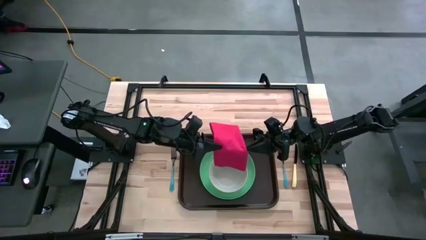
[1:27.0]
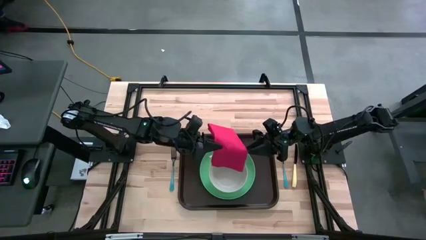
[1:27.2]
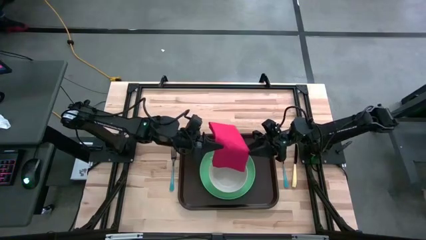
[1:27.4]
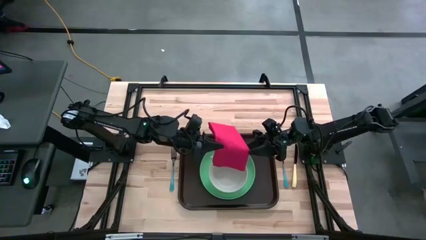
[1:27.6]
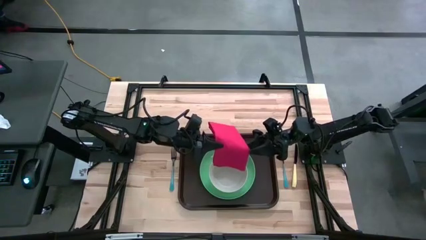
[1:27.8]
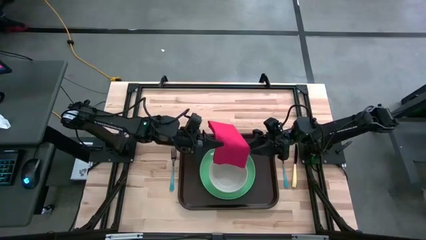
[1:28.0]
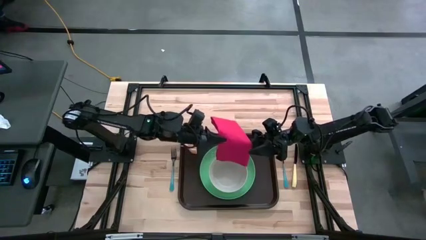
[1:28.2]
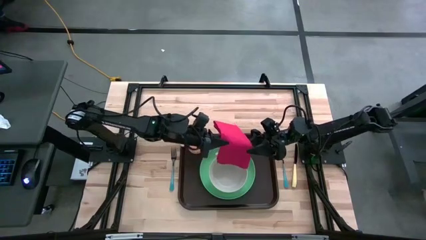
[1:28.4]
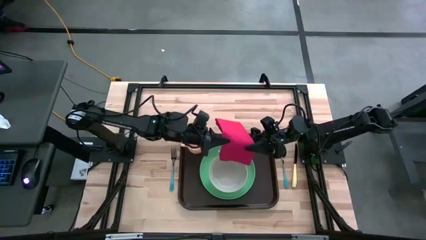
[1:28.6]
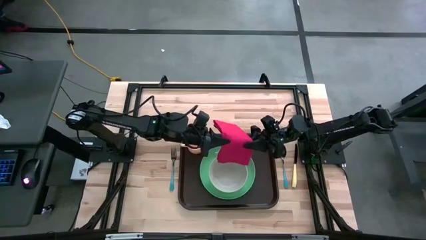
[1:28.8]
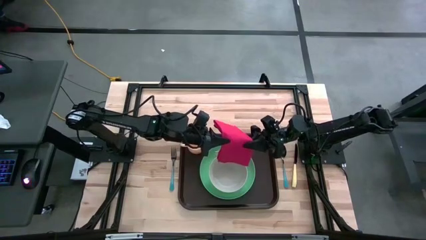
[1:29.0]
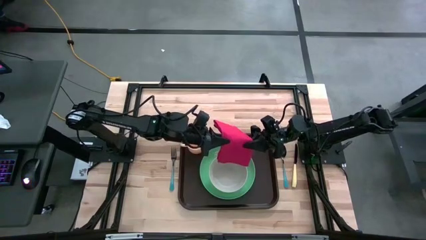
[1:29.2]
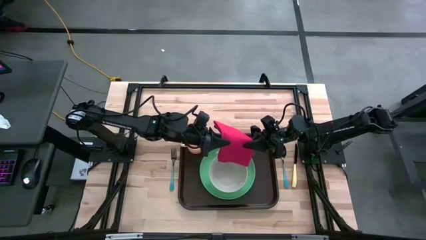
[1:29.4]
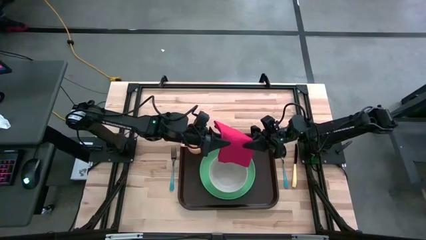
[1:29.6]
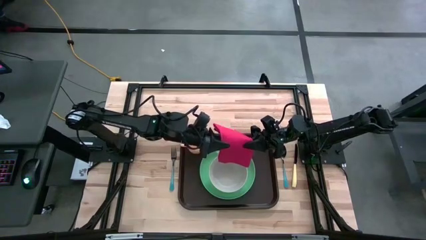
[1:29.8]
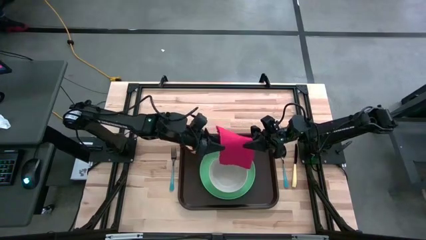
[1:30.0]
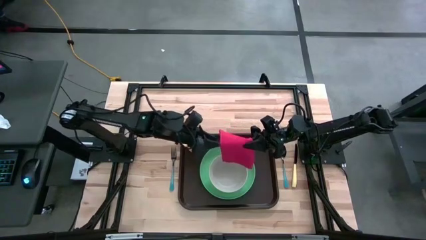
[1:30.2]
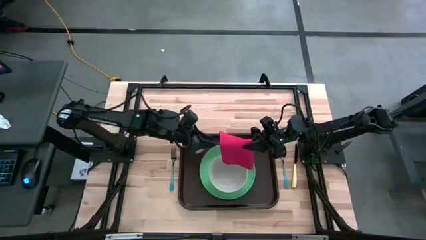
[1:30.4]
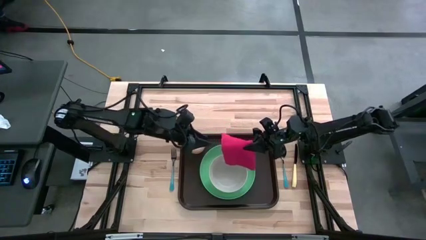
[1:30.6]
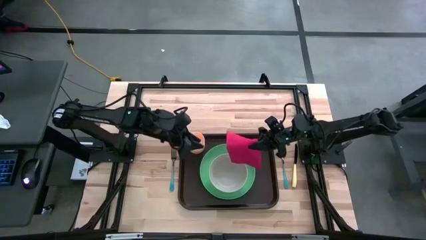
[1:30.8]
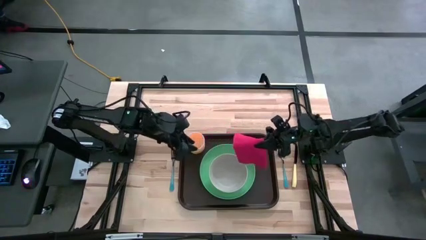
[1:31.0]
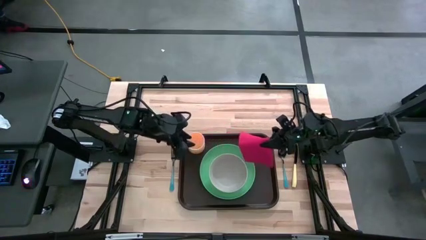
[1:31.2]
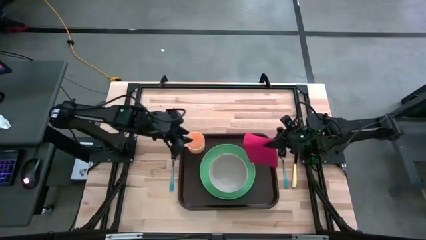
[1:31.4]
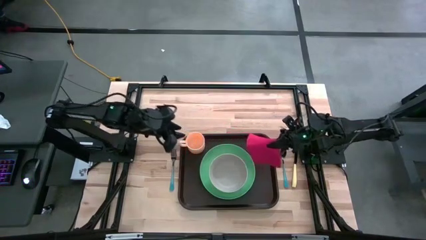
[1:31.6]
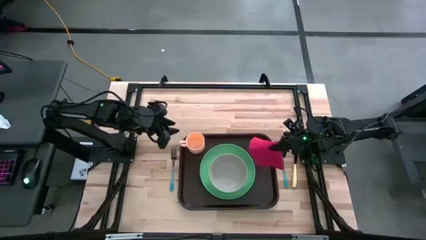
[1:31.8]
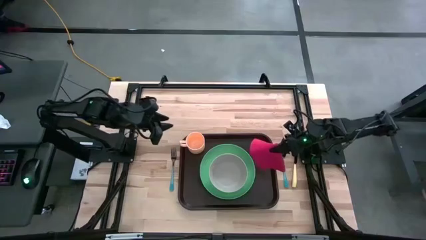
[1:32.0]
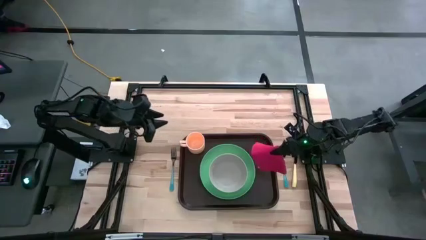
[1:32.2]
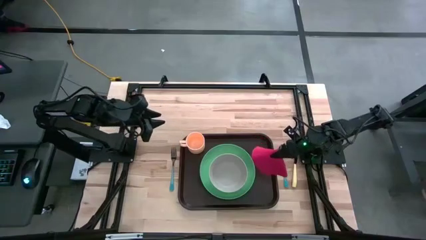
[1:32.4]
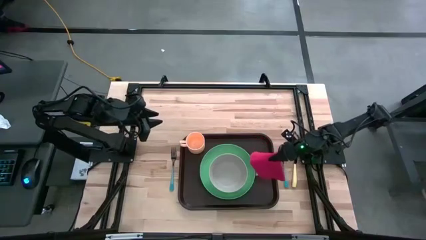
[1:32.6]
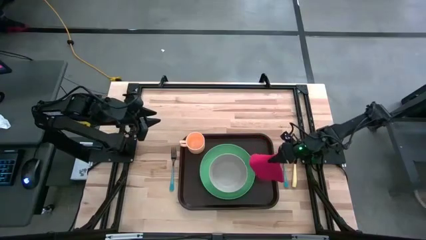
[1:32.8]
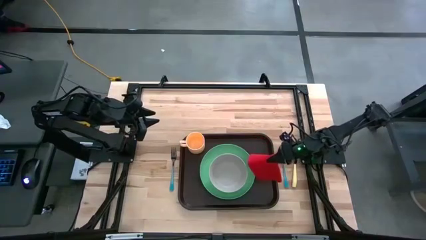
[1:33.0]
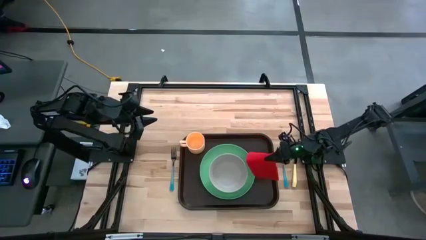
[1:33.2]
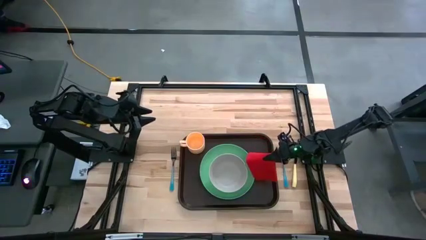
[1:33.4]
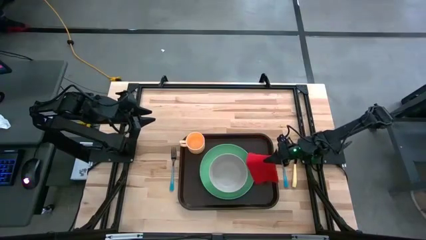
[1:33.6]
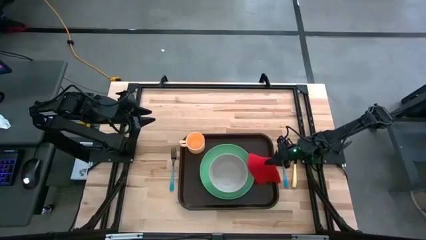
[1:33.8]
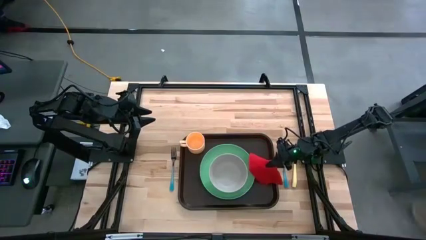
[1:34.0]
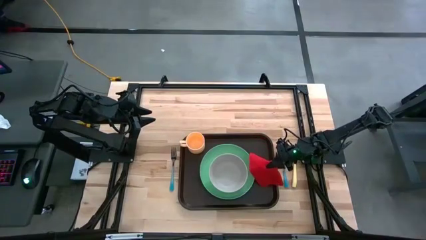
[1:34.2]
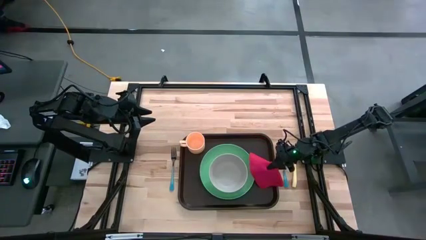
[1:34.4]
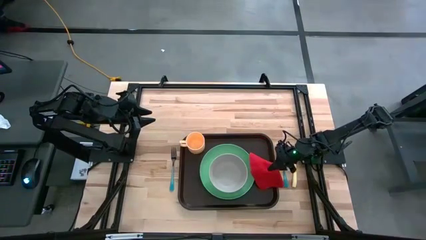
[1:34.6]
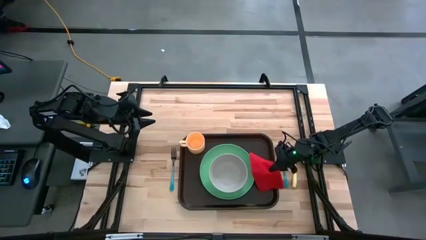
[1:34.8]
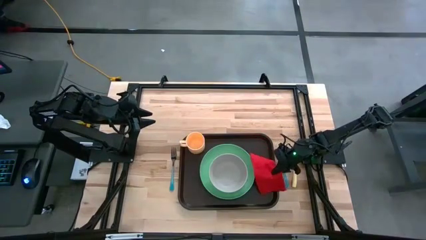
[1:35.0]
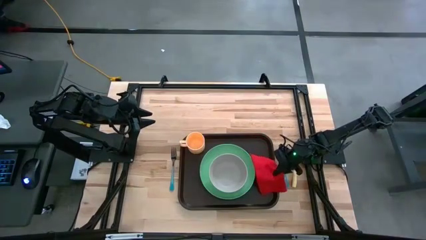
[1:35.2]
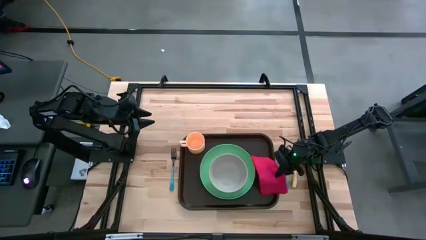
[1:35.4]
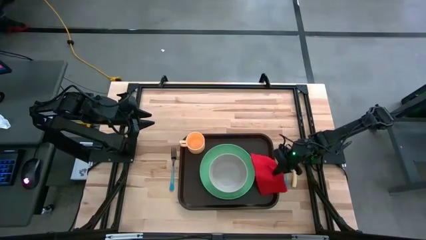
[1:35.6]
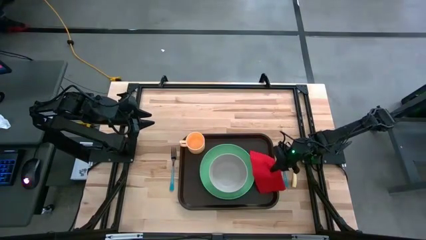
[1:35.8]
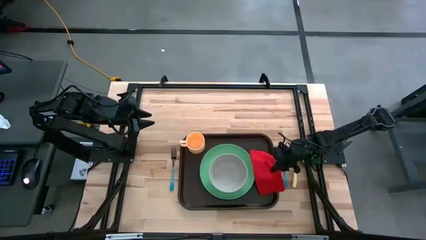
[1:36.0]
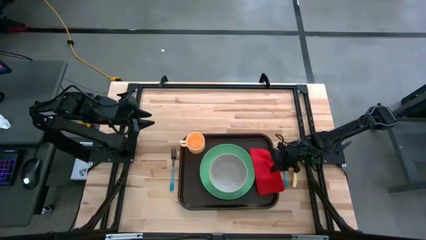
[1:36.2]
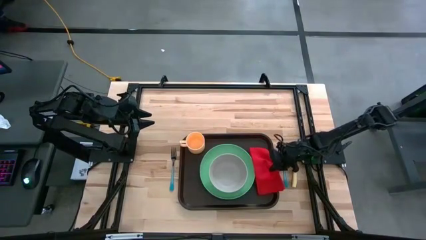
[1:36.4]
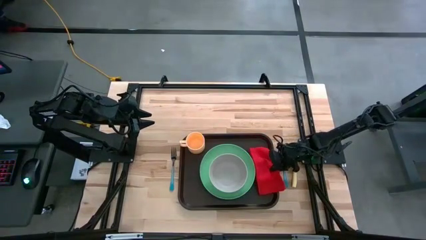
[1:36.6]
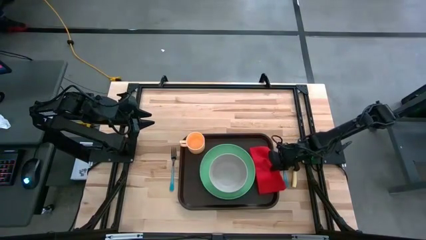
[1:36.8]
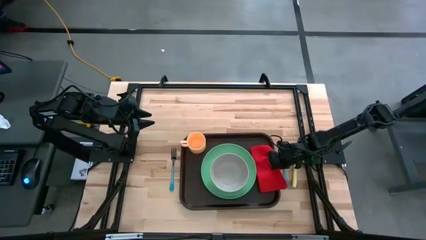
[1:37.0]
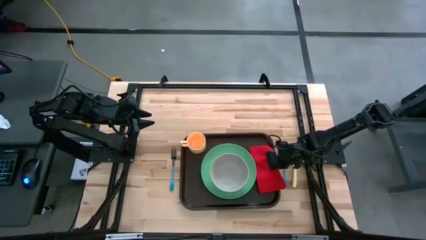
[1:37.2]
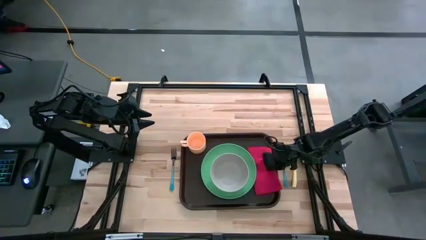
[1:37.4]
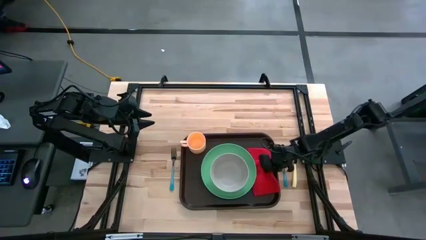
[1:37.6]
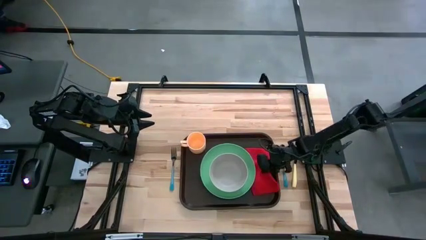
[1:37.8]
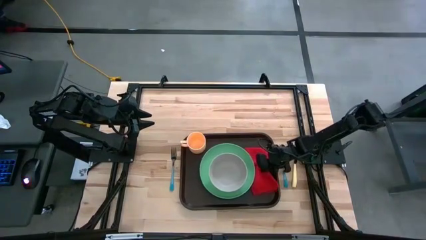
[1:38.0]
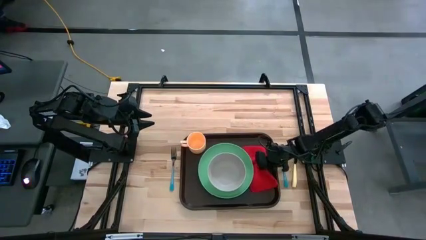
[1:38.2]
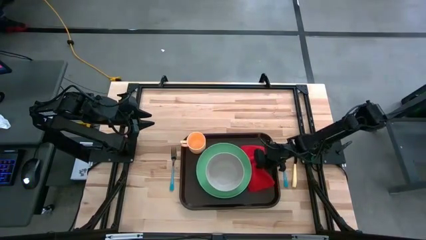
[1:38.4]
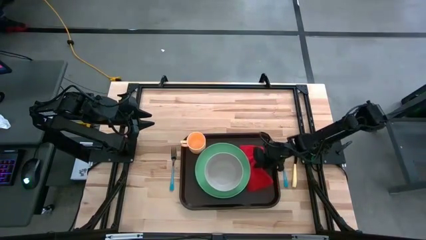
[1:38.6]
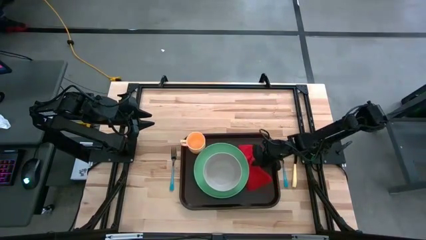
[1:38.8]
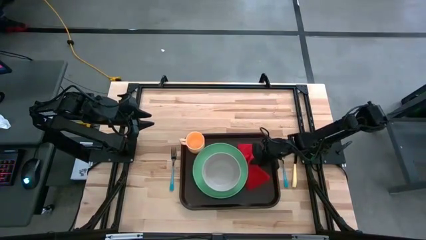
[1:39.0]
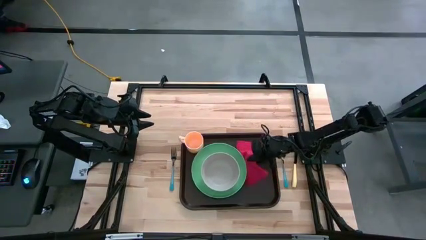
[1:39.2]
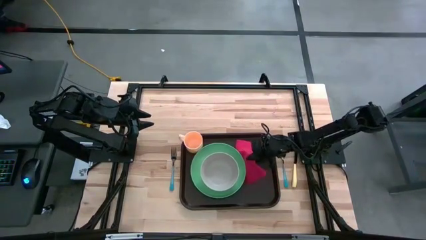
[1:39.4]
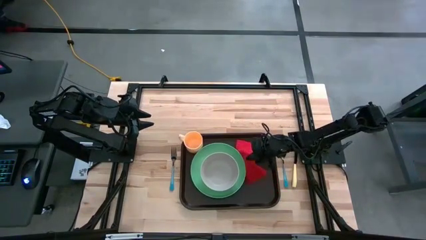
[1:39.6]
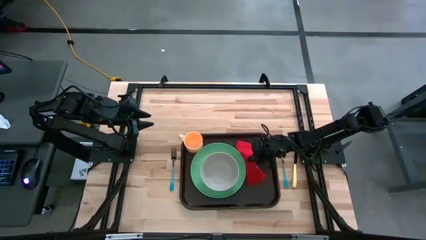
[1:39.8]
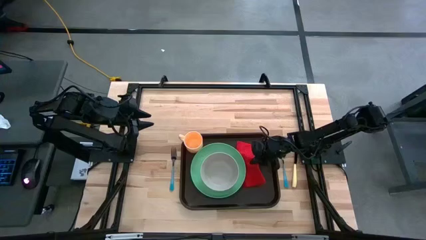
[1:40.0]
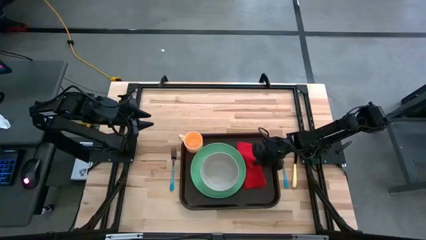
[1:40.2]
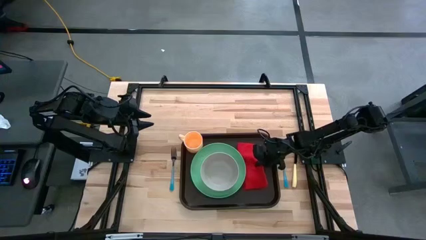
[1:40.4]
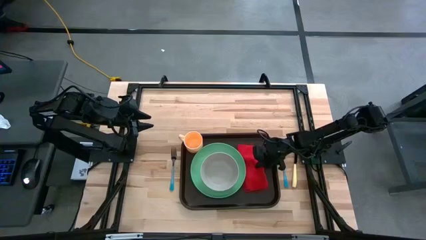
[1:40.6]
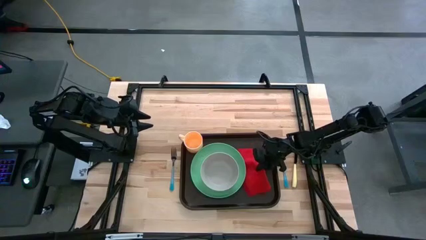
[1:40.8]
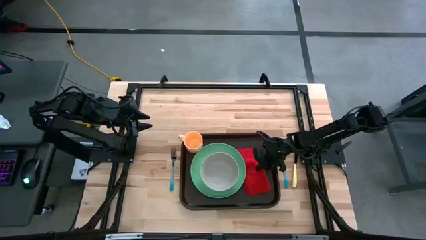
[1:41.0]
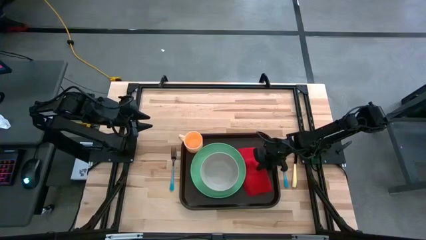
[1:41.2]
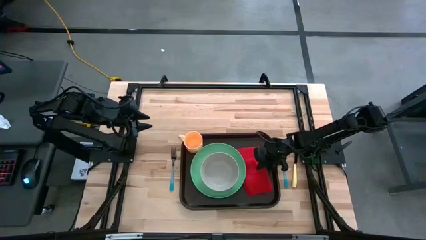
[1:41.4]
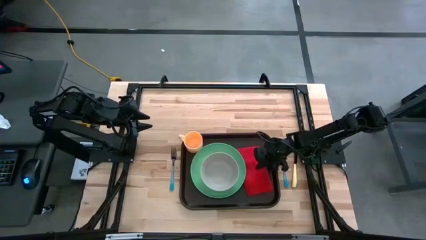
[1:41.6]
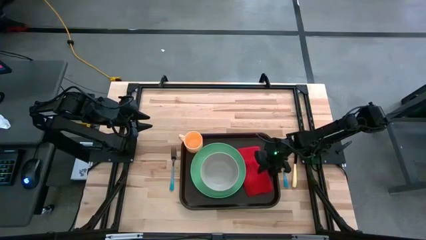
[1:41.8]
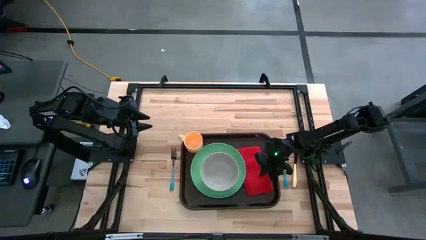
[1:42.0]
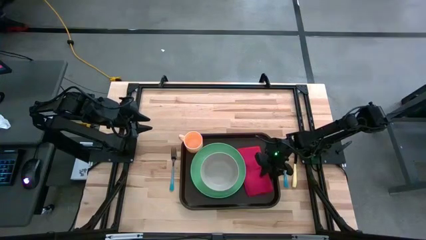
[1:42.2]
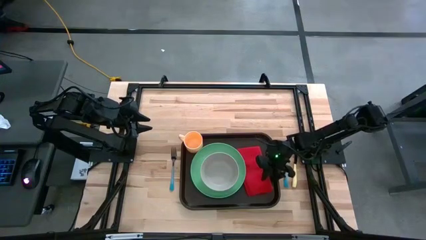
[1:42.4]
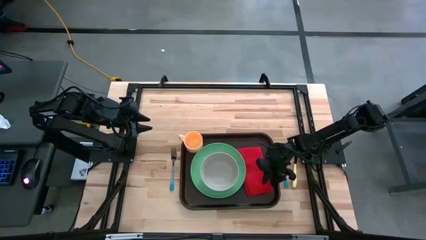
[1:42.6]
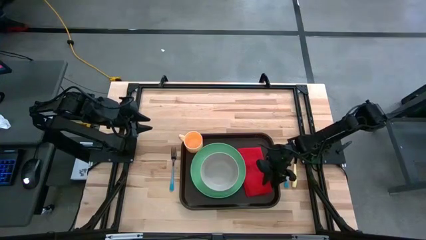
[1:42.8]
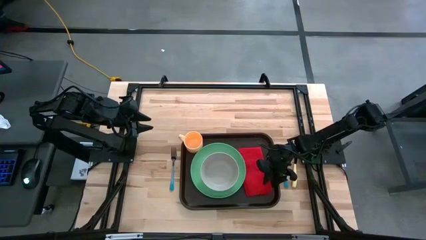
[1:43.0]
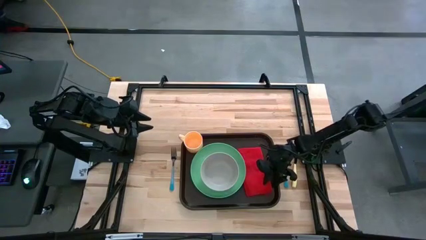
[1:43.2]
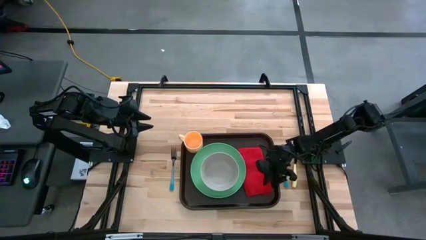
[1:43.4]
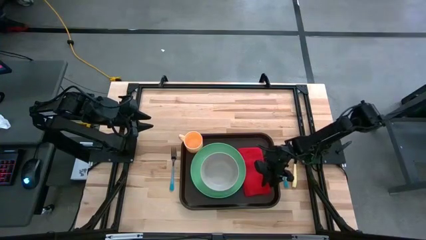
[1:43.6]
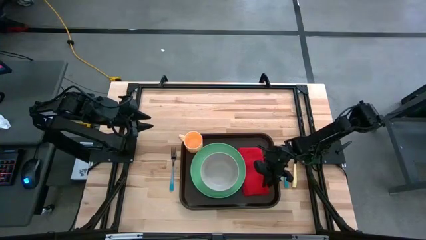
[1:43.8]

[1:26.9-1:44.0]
Task: Set up tray
Put the red table napkin beside the plate on the brown serving tray
